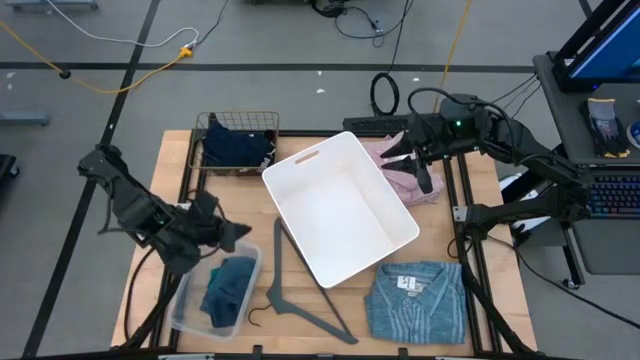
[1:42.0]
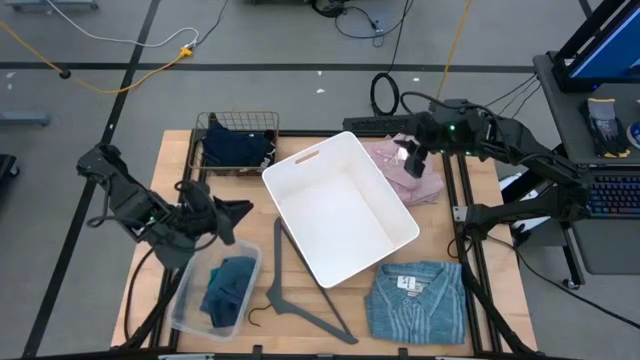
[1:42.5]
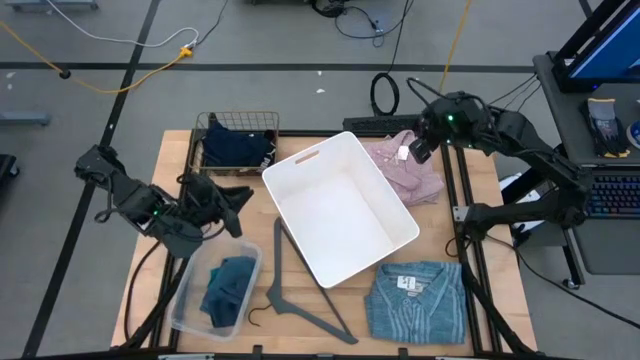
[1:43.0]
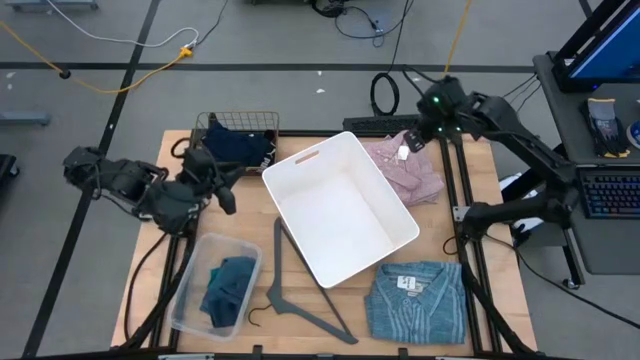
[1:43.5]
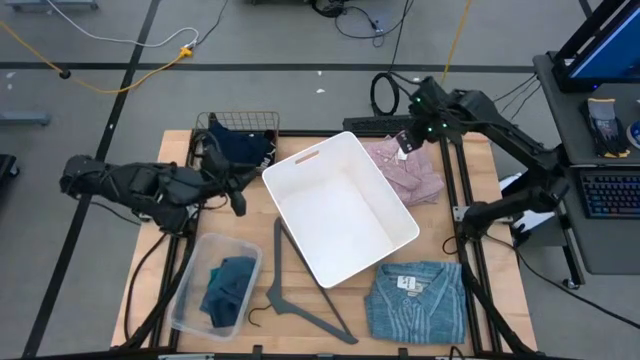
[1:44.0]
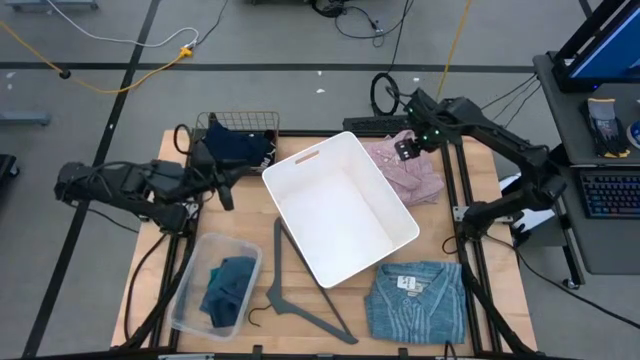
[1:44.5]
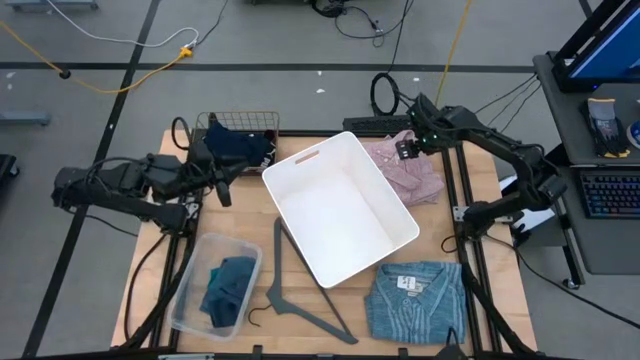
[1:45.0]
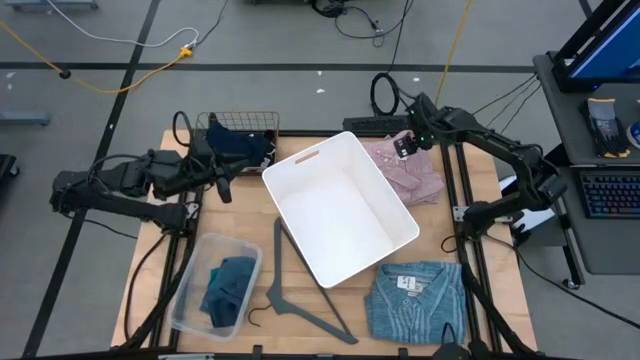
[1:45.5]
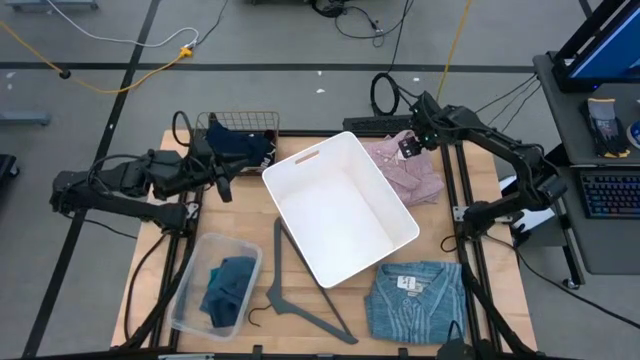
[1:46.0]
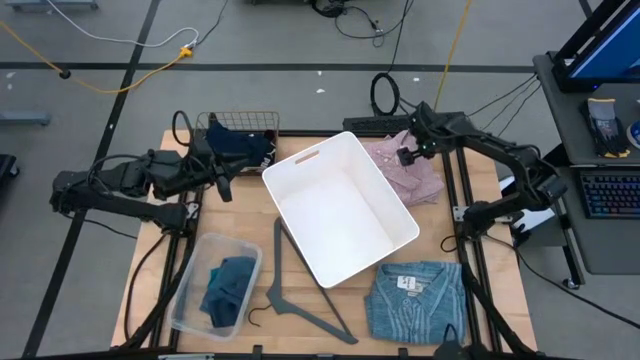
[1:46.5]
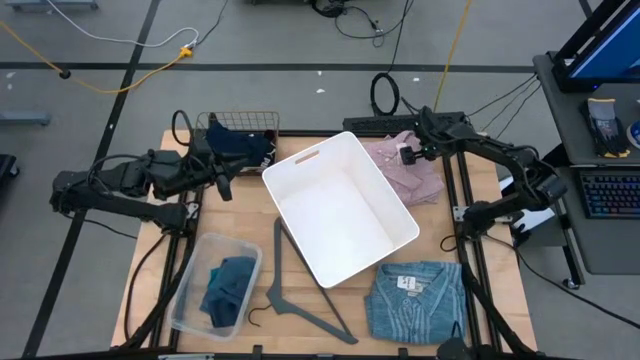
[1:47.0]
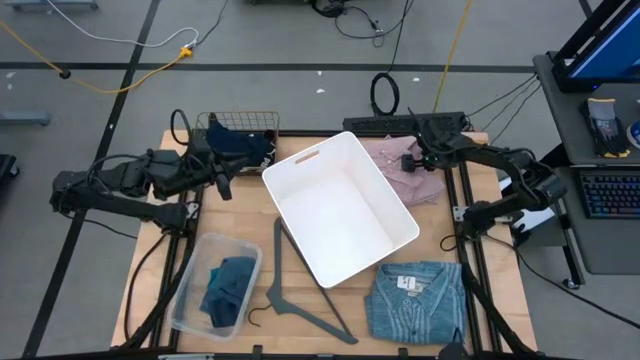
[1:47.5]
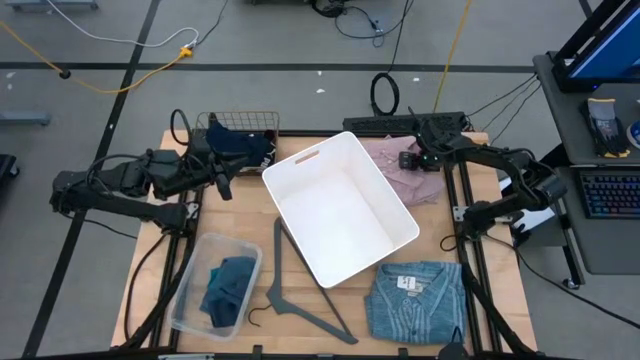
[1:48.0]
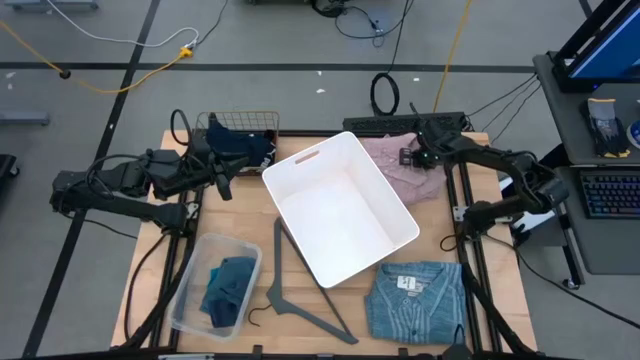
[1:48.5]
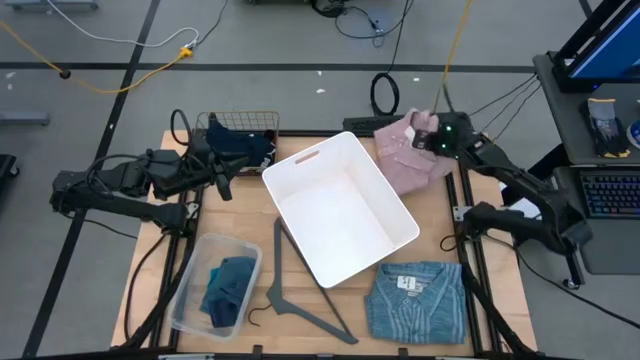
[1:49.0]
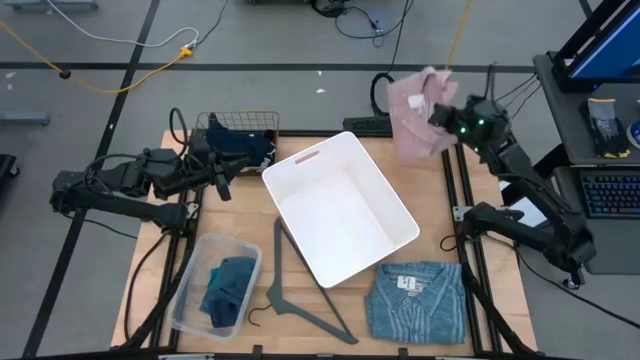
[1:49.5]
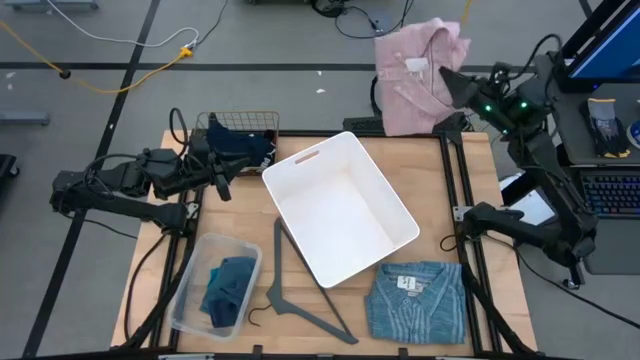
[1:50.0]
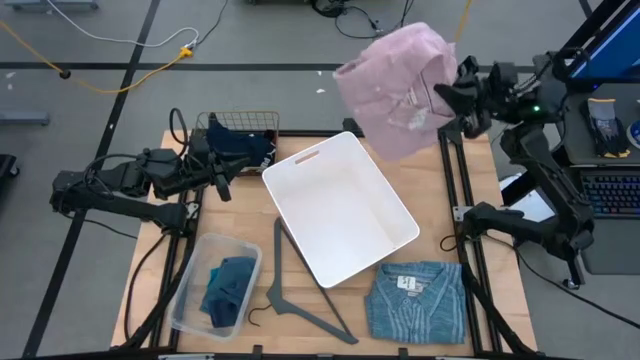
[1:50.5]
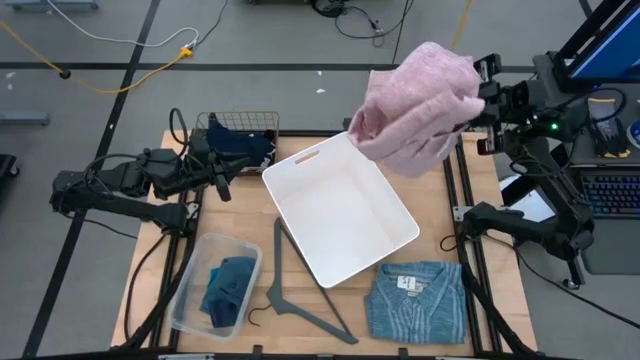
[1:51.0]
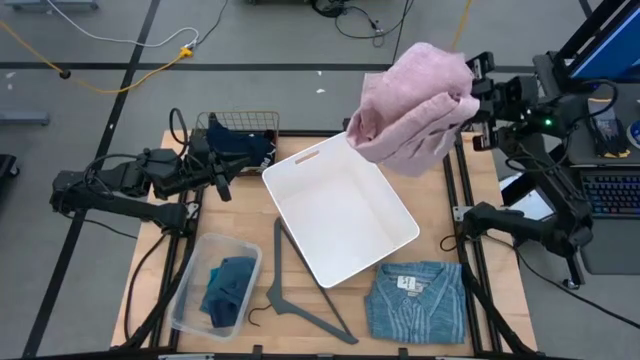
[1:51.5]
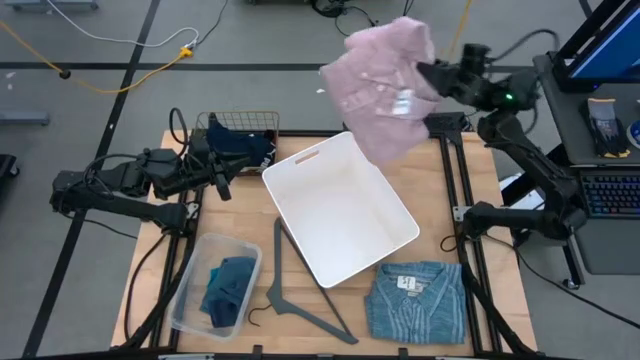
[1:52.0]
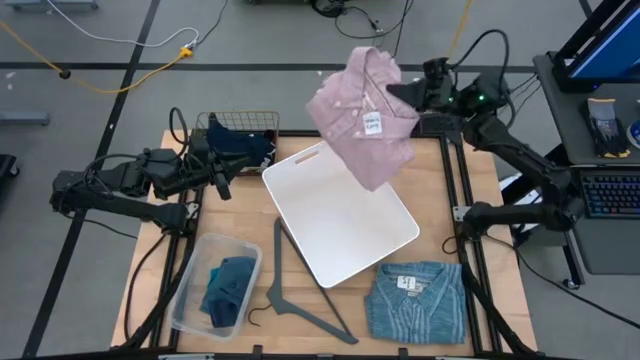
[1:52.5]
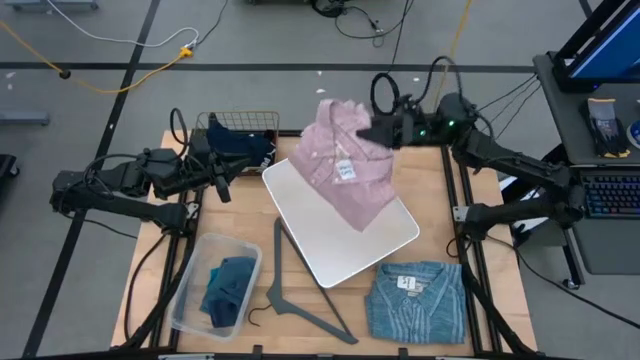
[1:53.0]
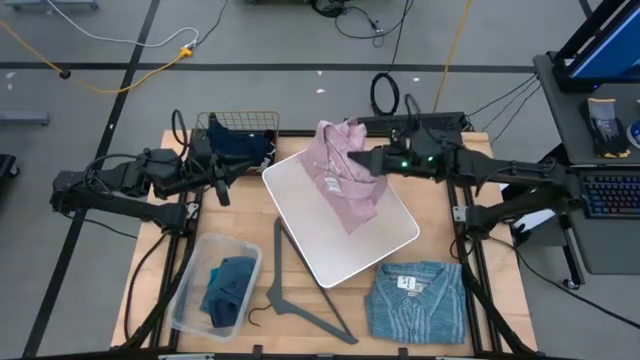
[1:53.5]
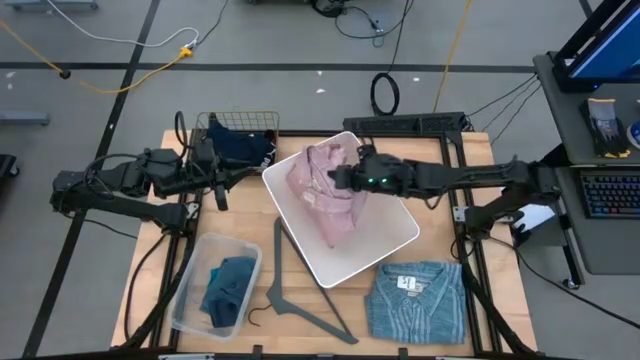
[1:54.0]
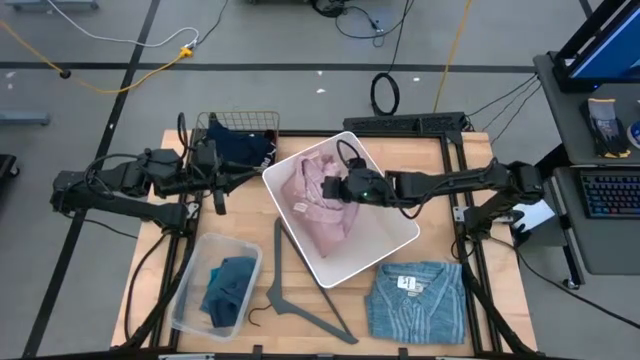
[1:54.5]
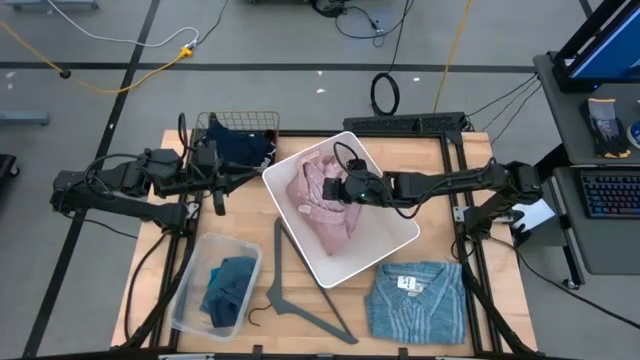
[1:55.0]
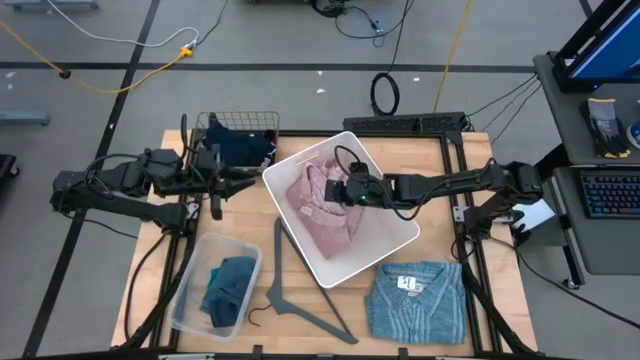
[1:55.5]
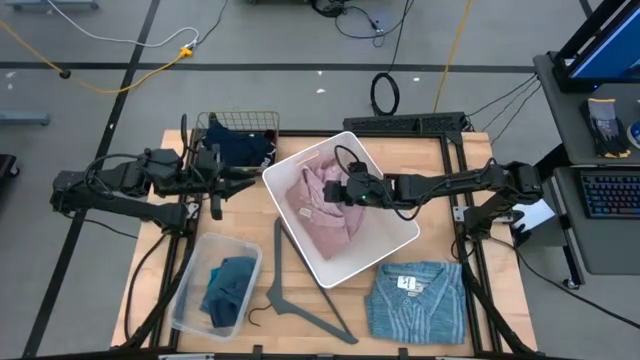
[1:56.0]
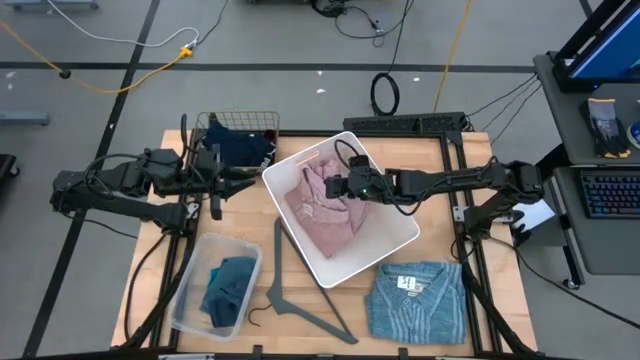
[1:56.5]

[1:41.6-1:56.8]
Task: Pick & Place Cloths
Put the pink polo into the white bin

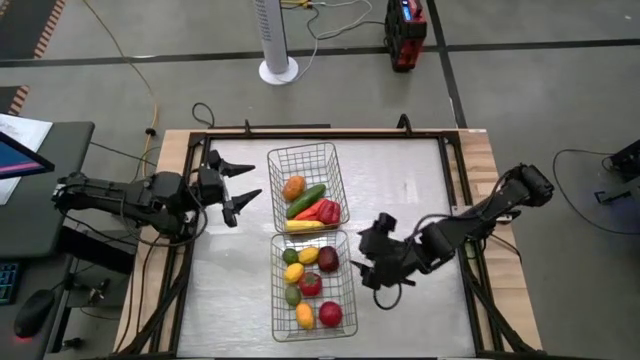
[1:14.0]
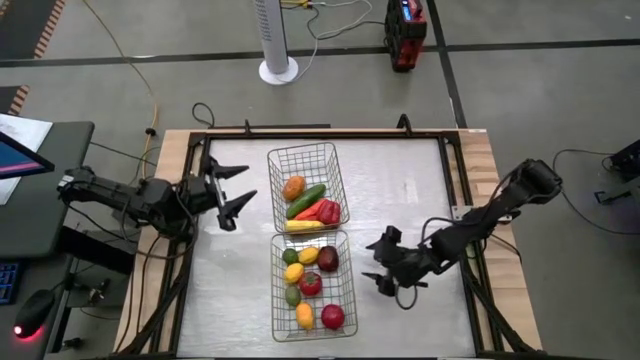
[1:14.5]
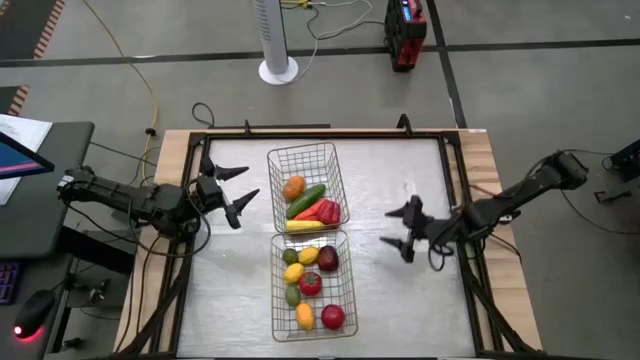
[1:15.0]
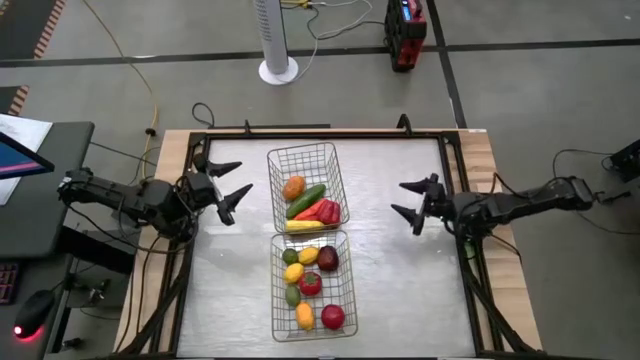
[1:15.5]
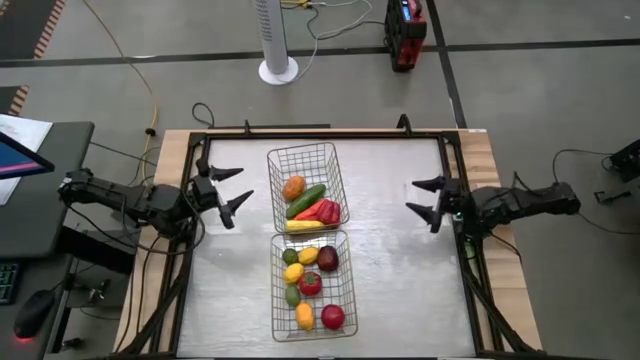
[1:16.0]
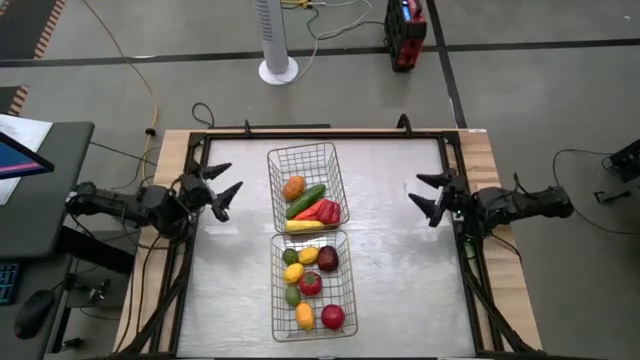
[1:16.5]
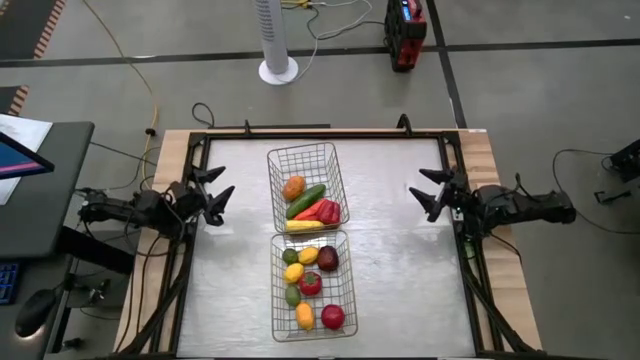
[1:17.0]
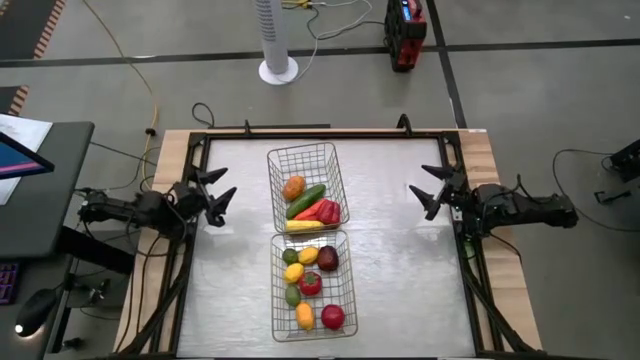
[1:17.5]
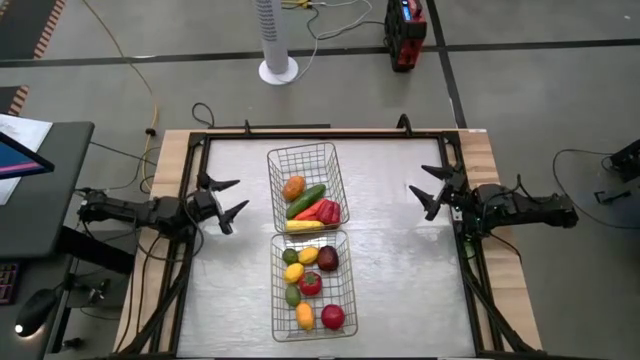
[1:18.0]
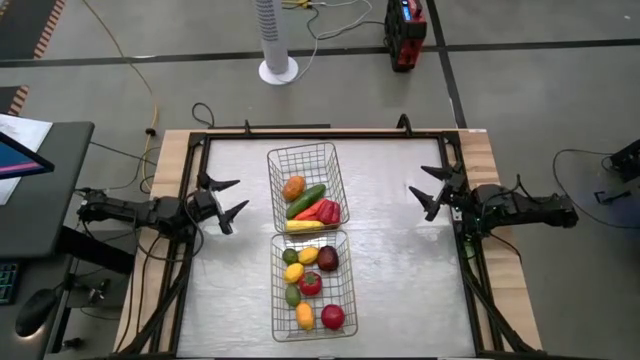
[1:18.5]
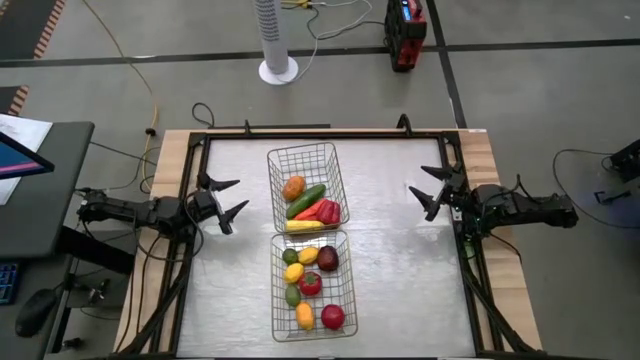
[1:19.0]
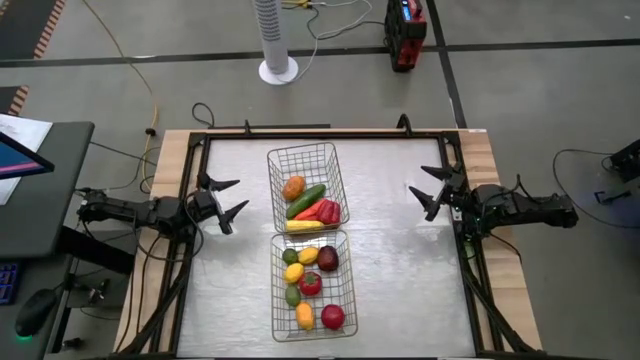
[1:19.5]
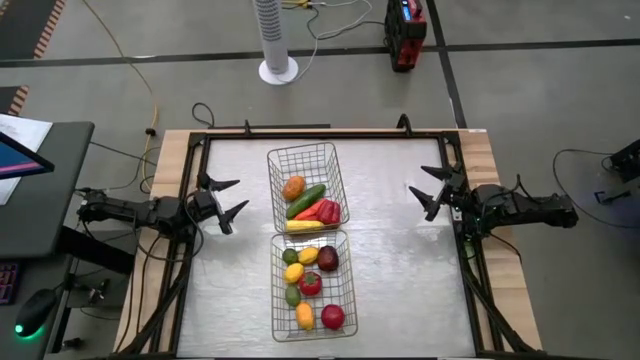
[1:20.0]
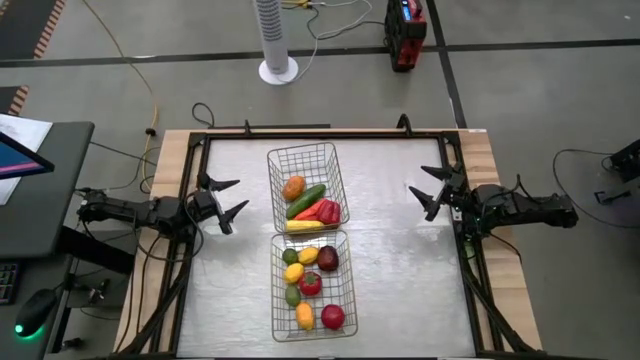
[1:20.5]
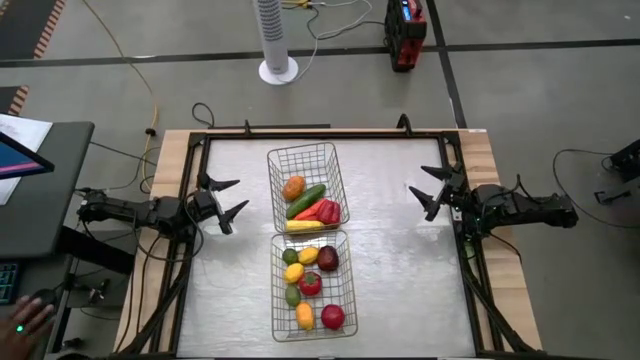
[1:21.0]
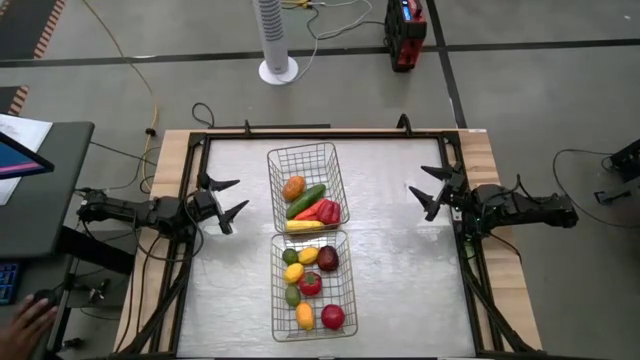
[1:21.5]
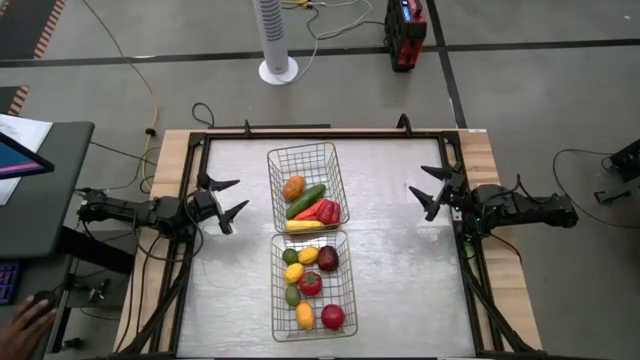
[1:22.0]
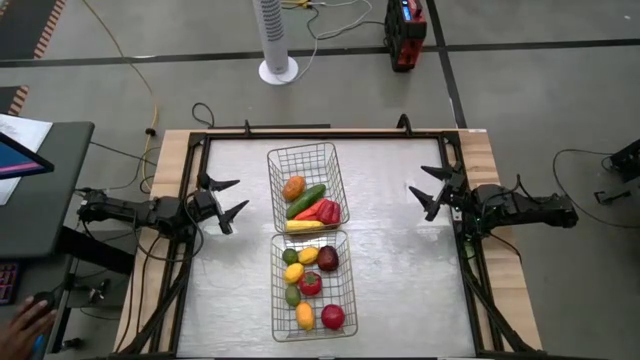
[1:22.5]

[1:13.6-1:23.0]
Task: Sort produce into baskets
Return to Home Position
